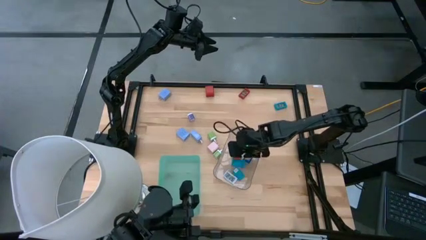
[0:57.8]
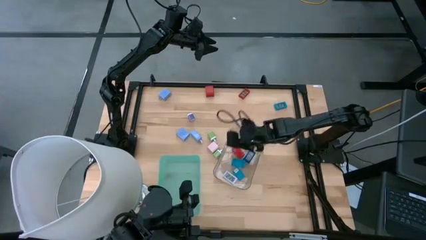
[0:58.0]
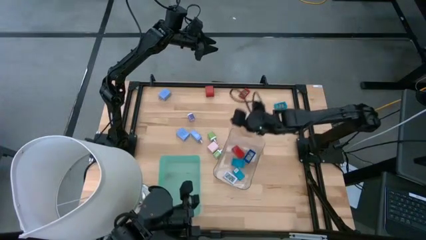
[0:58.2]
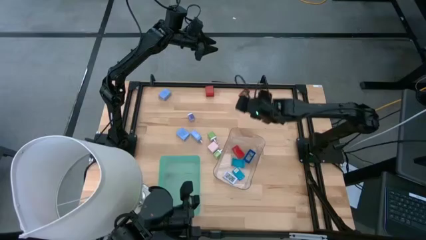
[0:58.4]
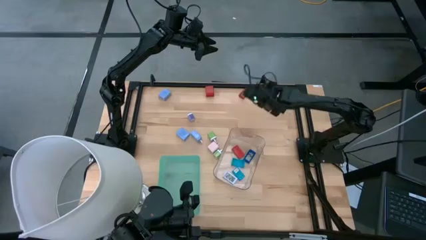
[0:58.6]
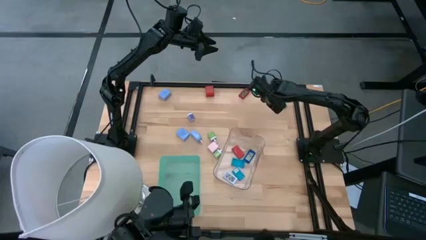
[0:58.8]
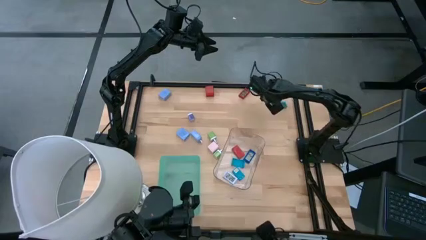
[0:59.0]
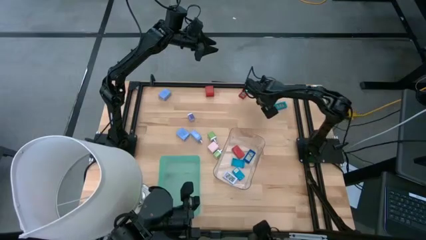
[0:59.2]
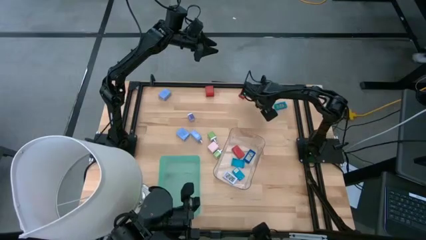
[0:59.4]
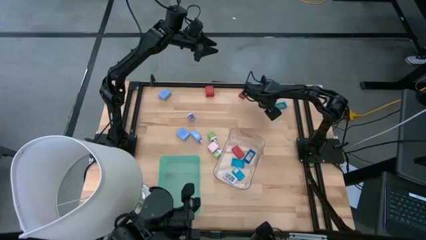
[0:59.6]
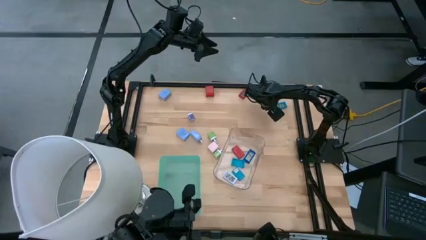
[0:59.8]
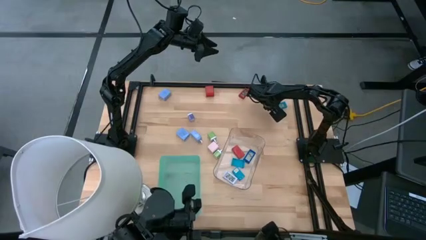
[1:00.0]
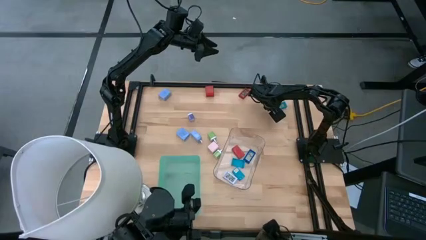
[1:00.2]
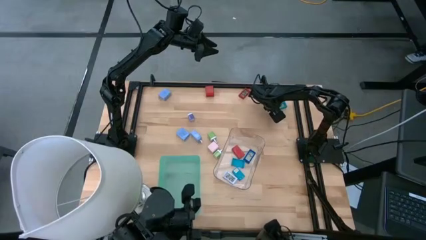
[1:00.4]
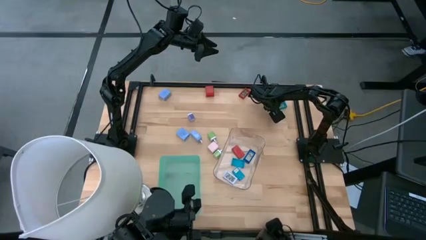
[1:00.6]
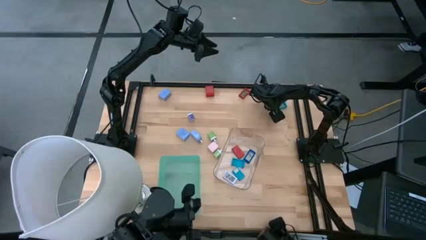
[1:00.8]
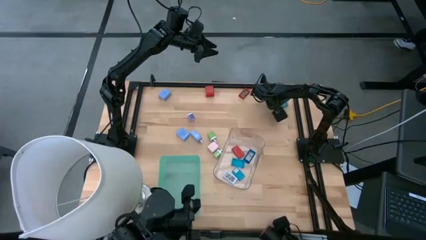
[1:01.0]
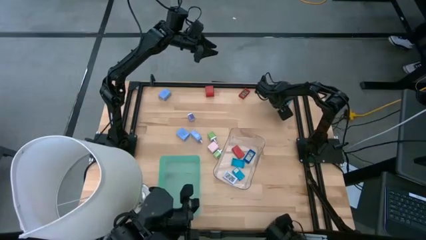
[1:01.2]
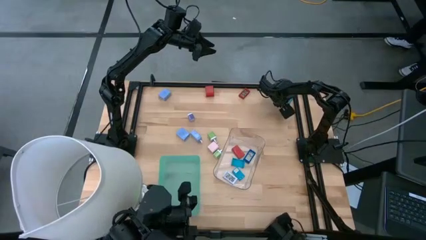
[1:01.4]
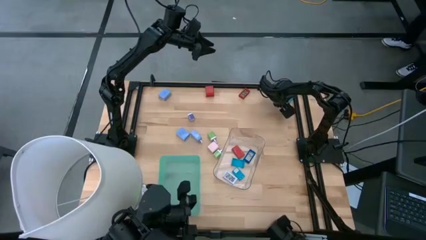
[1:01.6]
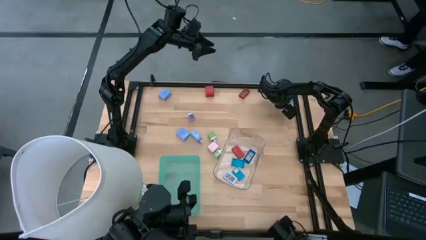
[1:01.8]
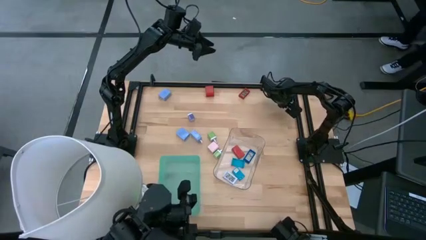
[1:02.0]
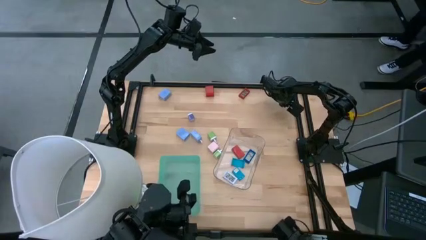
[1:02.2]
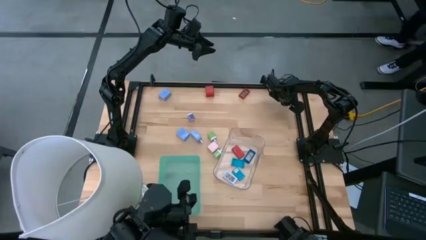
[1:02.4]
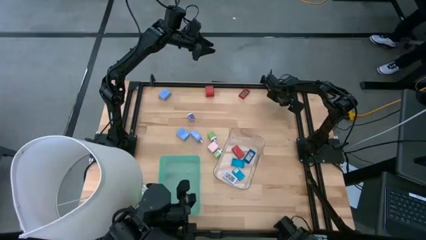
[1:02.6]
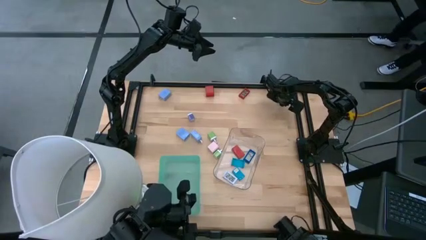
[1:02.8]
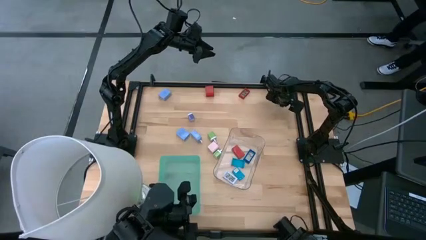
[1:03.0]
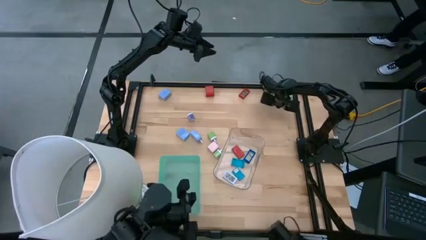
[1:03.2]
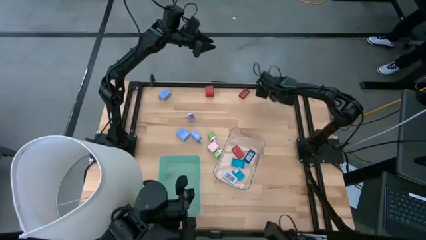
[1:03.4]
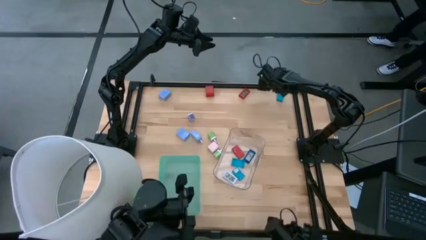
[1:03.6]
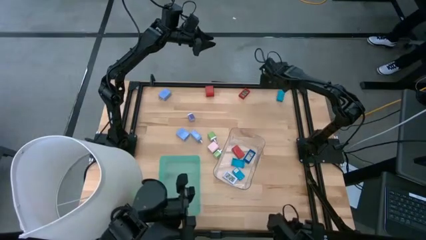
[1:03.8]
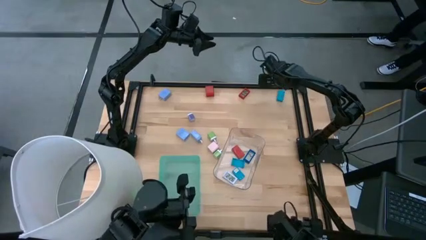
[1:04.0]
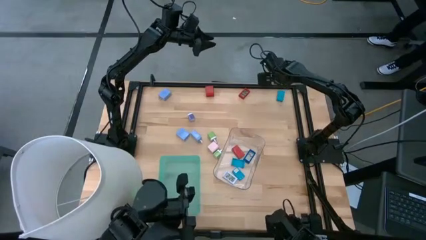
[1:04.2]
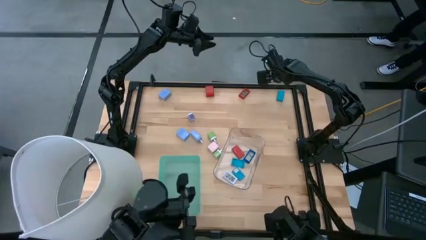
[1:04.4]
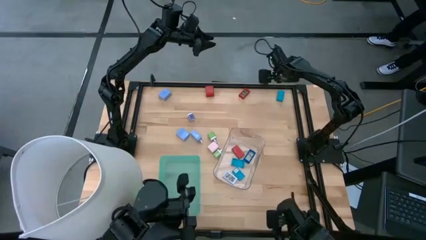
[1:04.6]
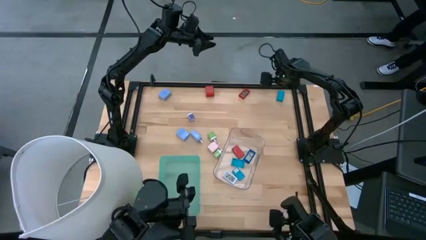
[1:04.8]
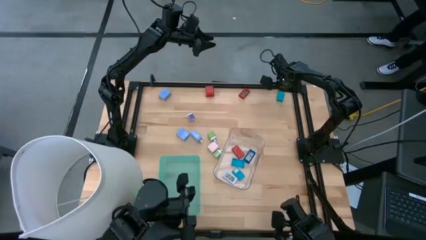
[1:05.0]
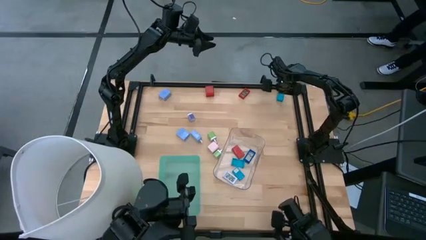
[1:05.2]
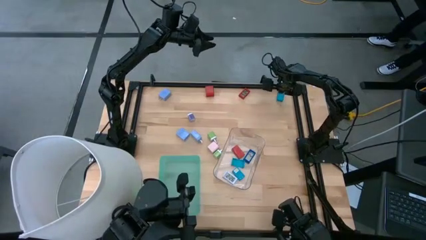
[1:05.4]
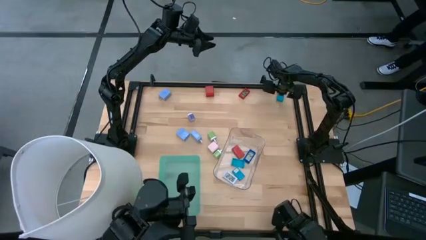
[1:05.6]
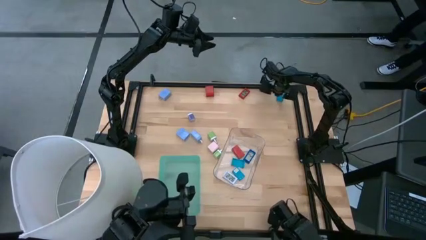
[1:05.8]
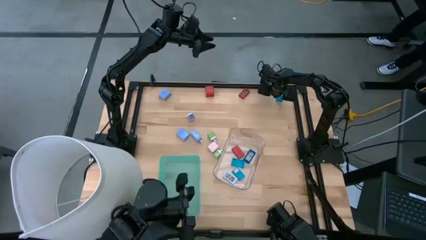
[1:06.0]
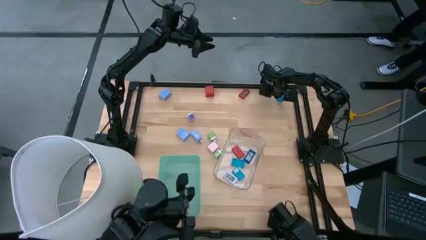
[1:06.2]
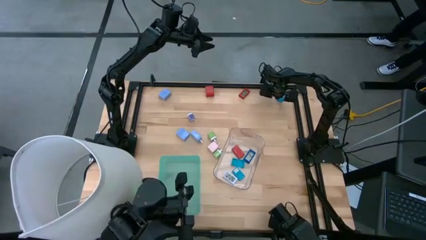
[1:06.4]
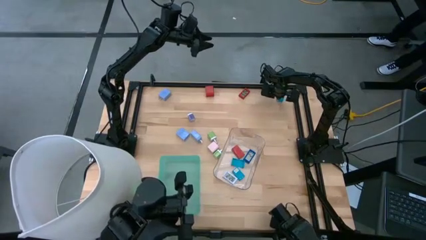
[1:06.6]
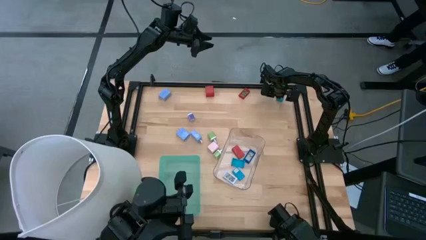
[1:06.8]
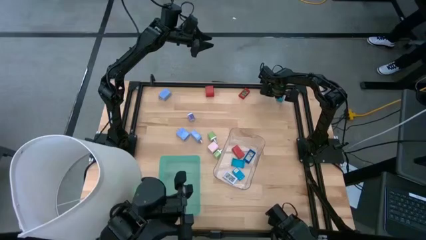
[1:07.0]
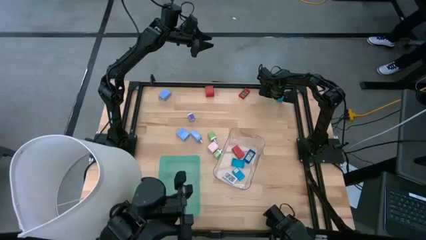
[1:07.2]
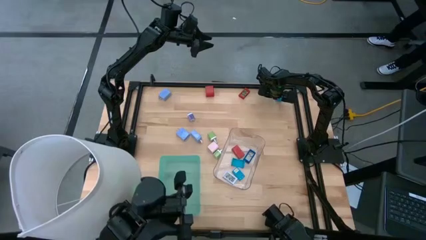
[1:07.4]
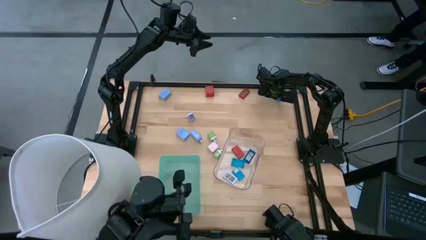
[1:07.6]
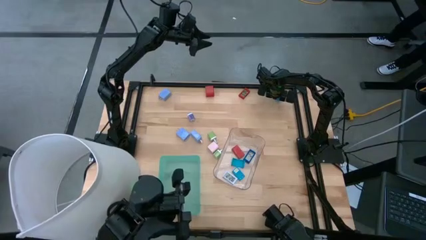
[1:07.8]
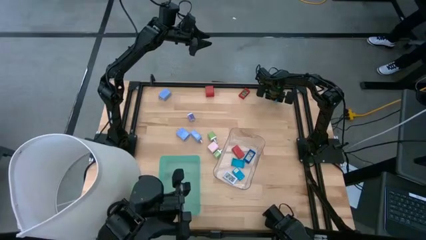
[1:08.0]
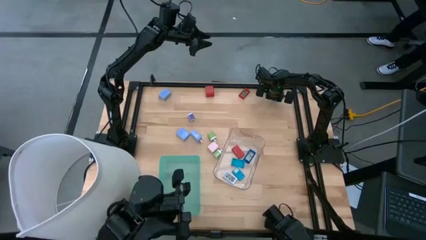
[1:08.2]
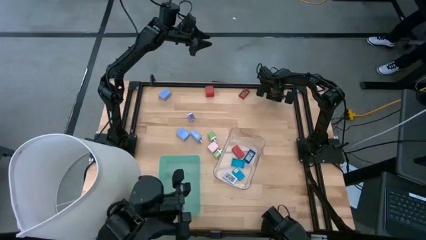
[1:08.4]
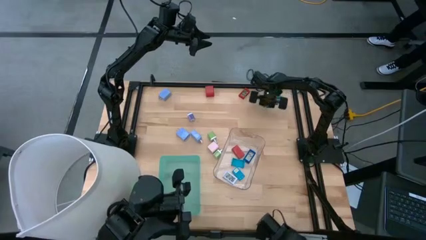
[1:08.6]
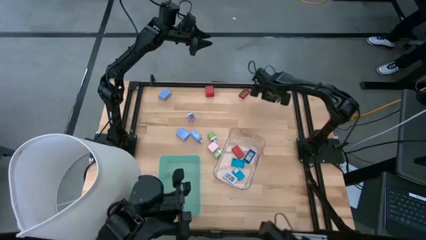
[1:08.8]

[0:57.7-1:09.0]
Task: Pick & Place Office items
Put the light blue digital clock into the transparent bin

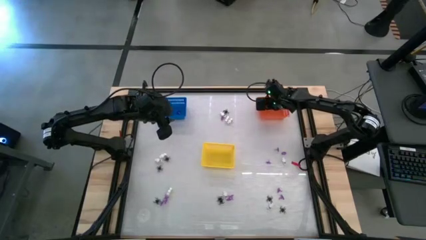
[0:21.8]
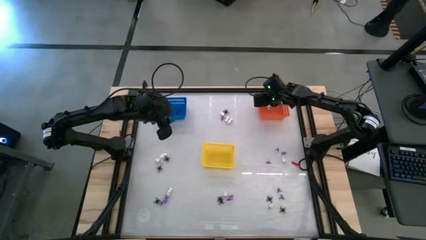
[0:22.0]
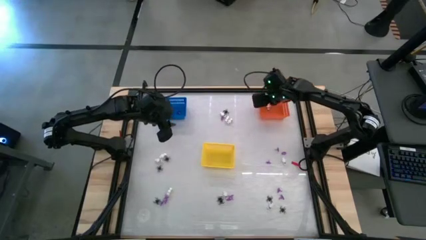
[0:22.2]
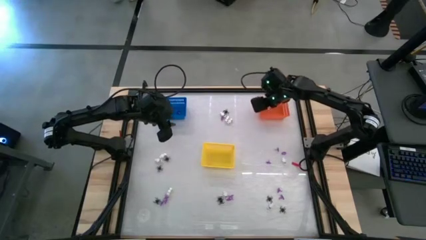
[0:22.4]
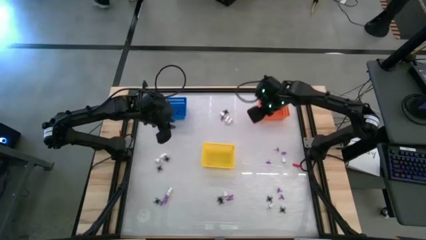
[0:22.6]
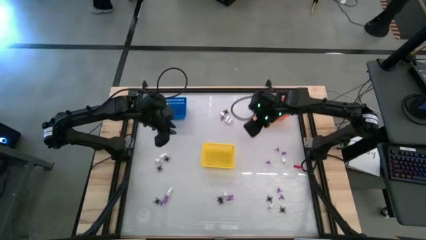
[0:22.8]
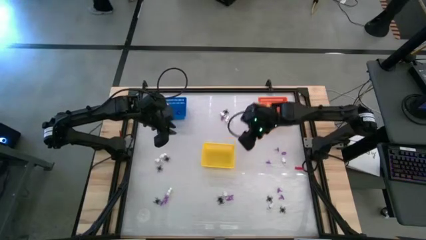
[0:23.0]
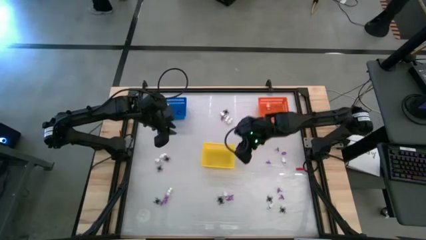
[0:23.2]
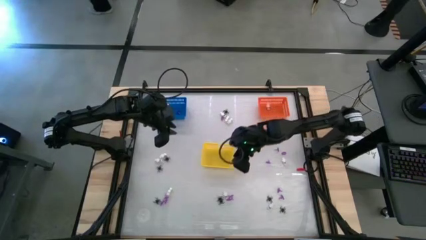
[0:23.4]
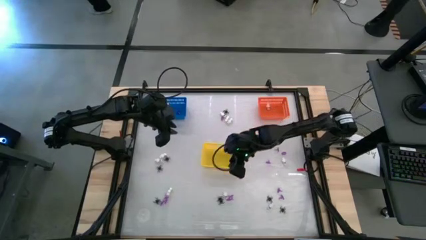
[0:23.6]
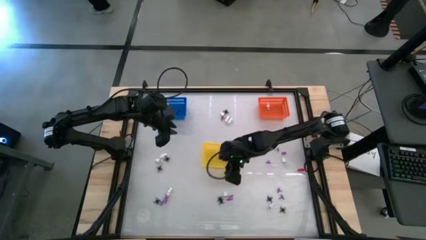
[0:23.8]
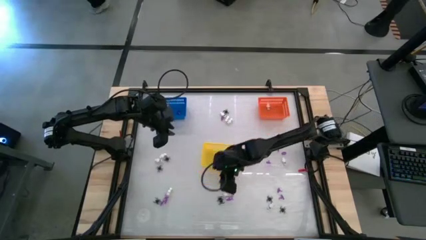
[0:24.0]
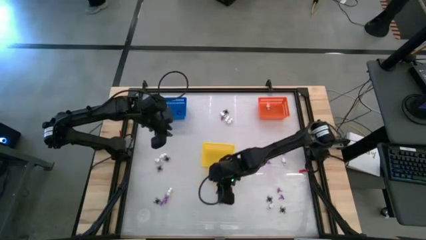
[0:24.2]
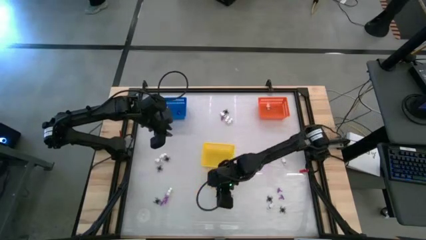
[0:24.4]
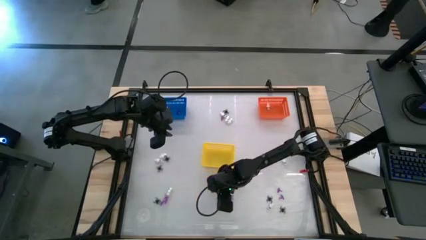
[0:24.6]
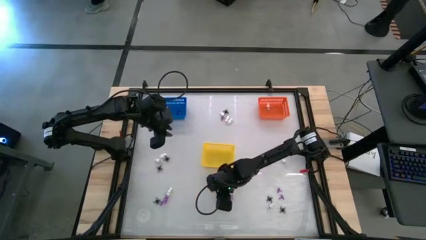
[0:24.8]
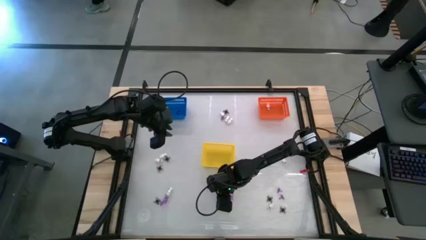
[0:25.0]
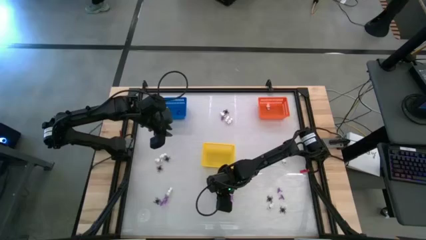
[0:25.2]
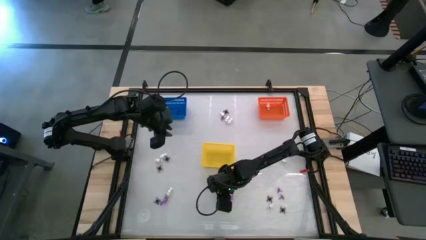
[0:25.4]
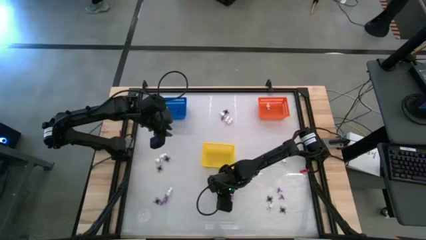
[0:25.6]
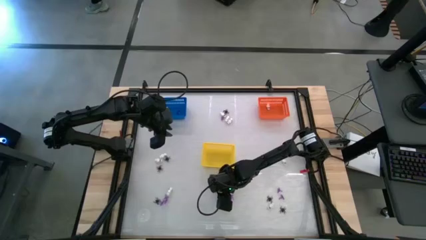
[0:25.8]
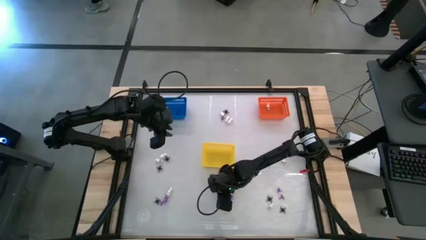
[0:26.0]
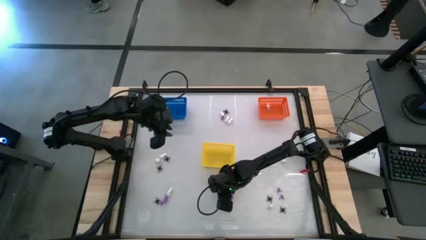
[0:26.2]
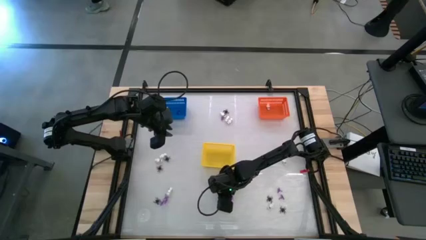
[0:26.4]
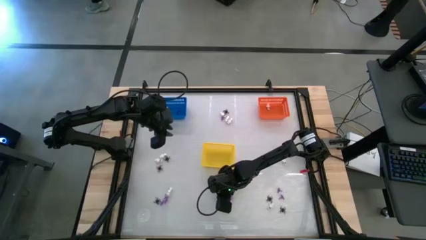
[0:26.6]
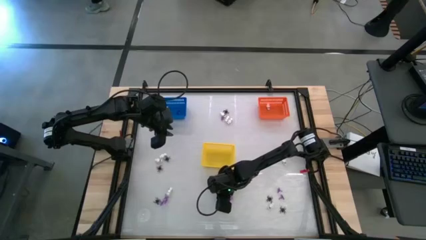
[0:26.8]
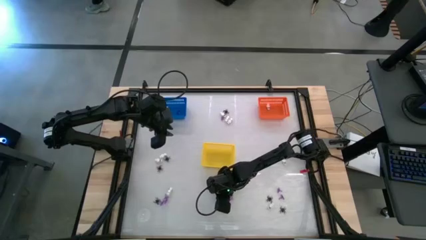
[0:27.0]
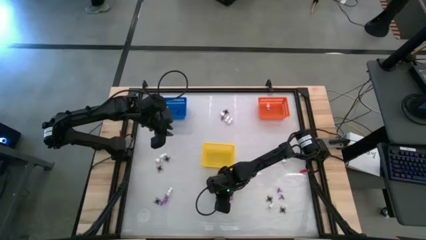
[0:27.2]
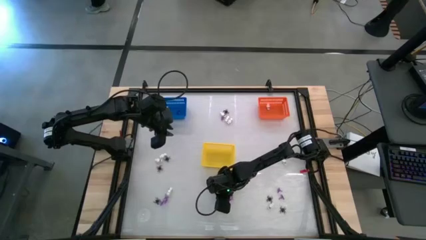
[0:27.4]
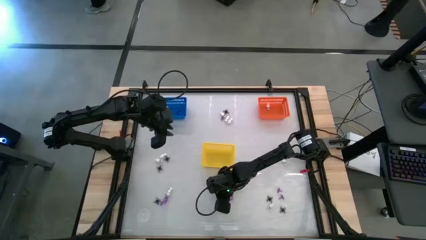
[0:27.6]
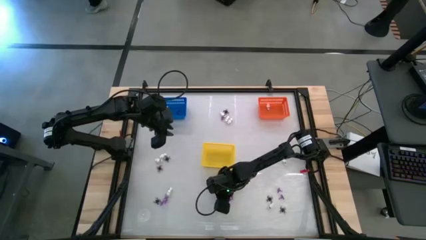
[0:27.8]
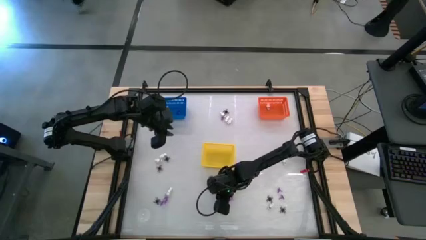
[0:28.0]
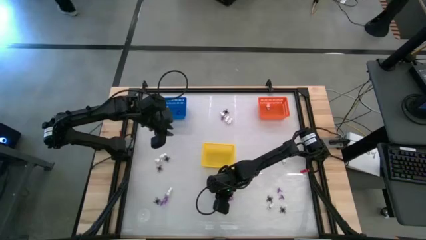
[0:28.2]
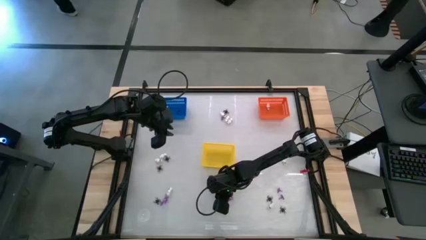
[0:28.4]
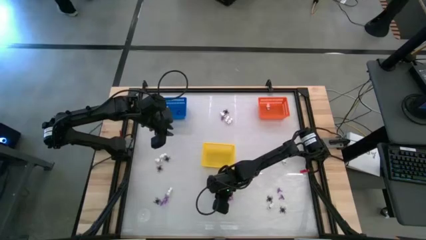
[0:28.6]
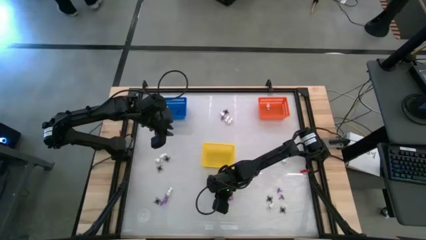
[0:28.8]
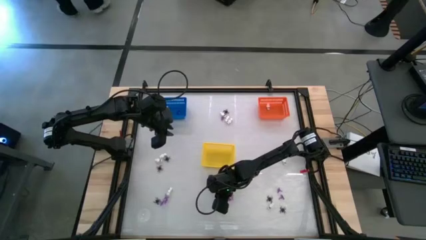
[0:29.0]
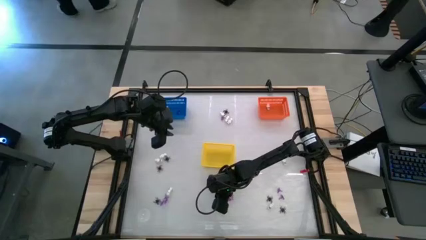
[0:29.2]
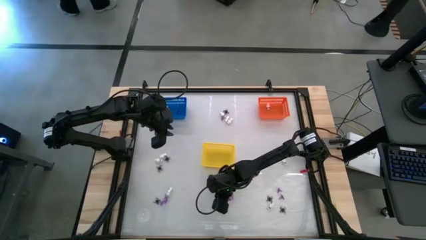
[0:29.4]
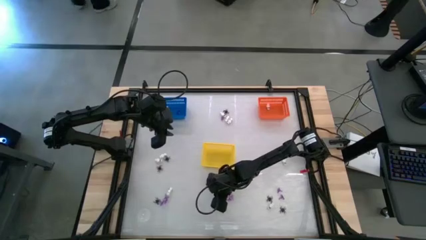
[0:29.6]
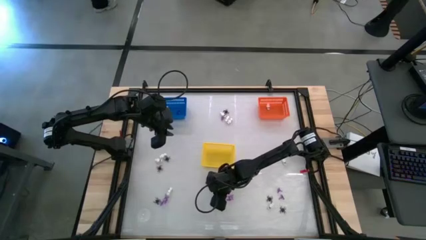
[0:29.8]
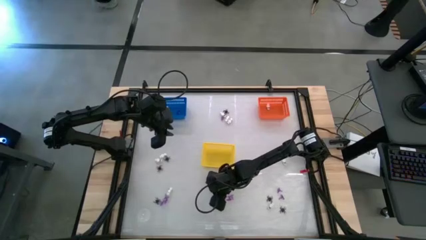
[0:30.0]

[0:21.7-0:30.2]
Task: Sort Halloween decoration
Put the black spider toy into the yellow bin
